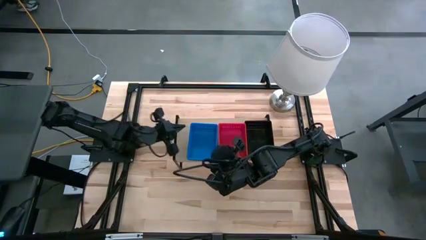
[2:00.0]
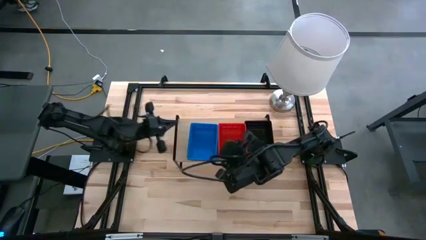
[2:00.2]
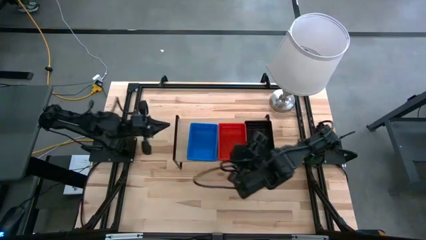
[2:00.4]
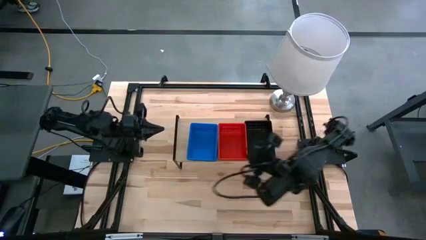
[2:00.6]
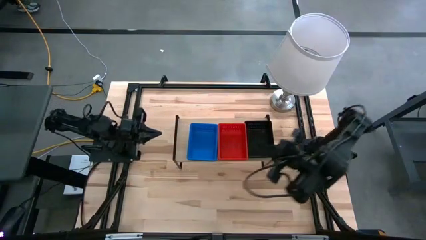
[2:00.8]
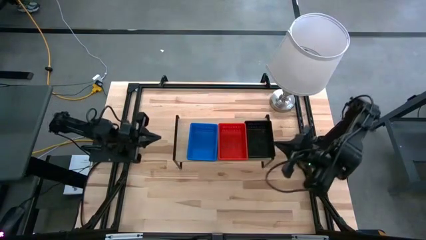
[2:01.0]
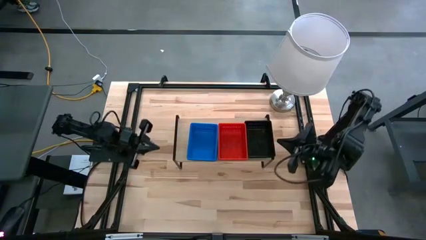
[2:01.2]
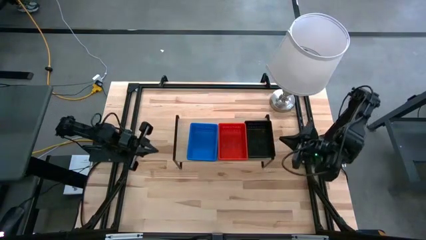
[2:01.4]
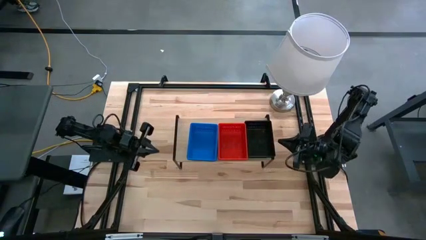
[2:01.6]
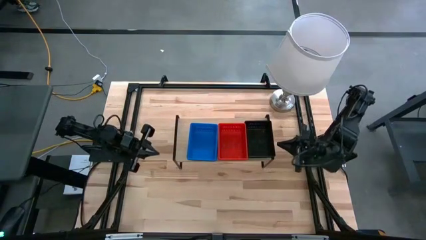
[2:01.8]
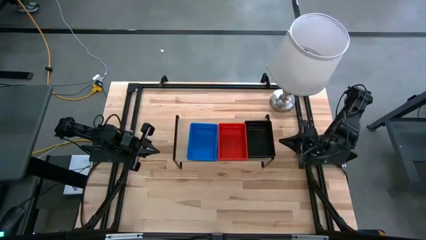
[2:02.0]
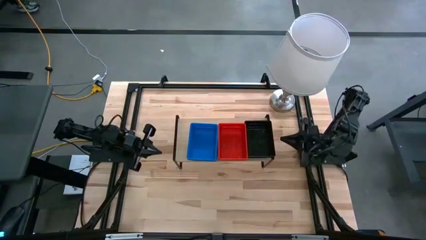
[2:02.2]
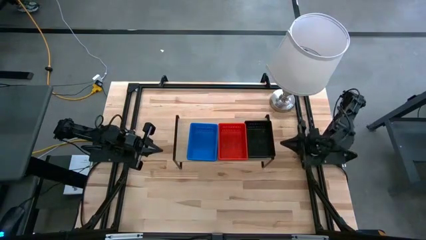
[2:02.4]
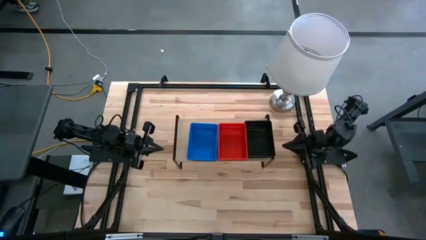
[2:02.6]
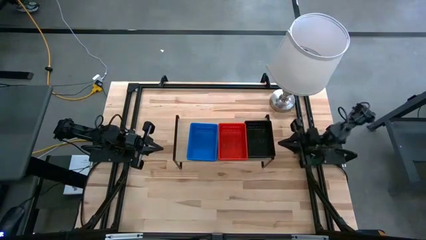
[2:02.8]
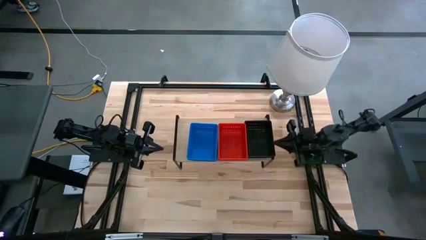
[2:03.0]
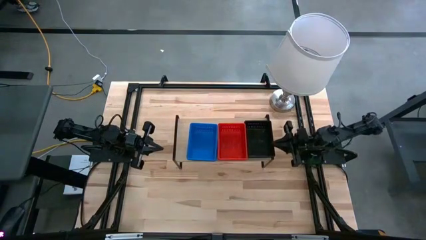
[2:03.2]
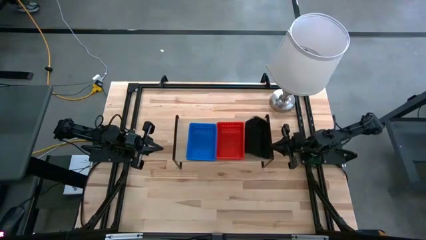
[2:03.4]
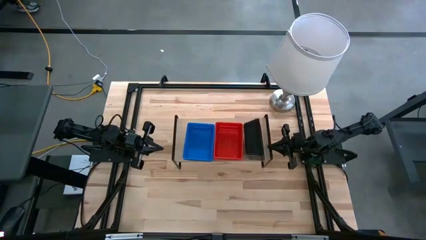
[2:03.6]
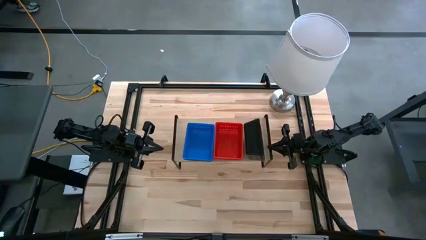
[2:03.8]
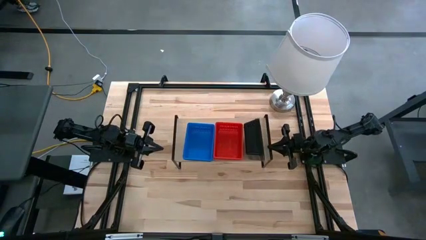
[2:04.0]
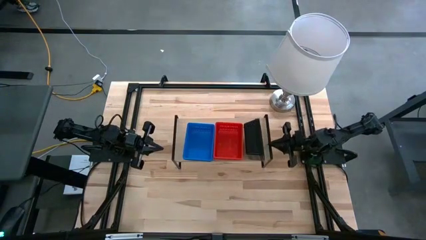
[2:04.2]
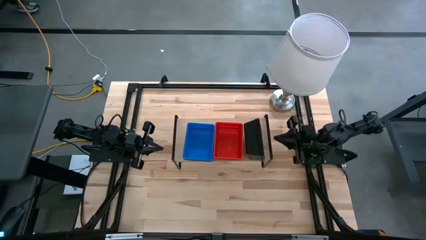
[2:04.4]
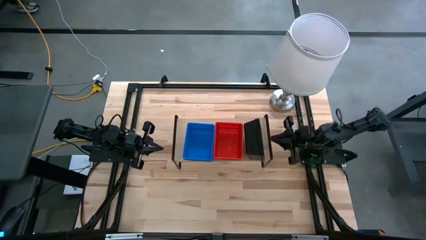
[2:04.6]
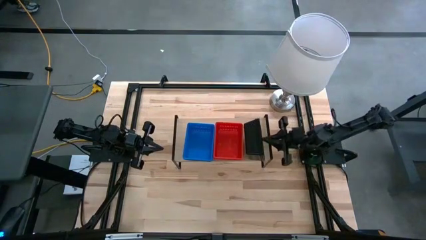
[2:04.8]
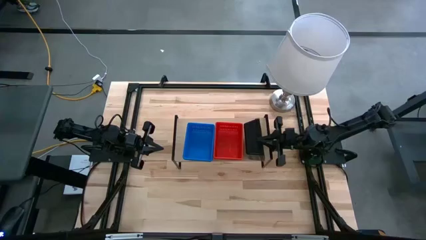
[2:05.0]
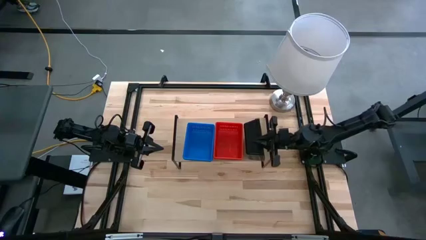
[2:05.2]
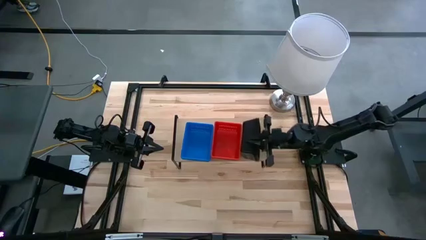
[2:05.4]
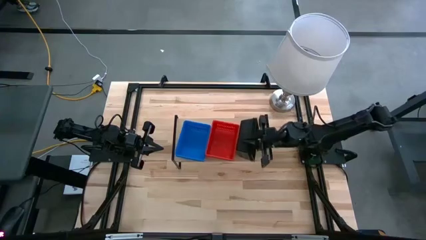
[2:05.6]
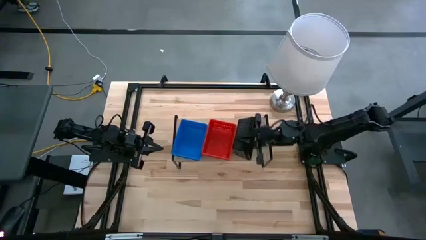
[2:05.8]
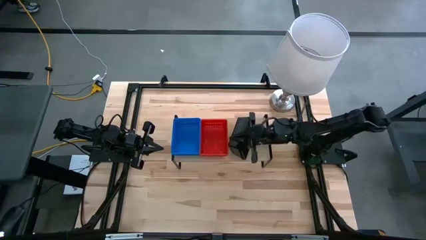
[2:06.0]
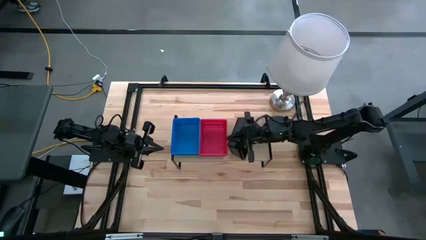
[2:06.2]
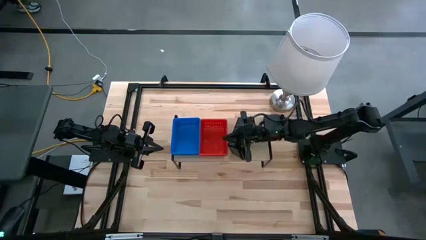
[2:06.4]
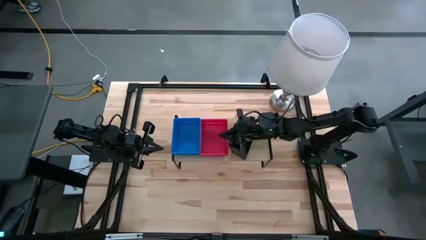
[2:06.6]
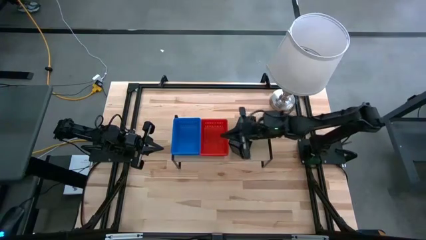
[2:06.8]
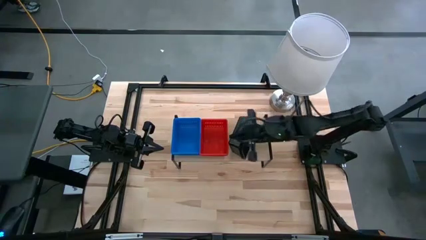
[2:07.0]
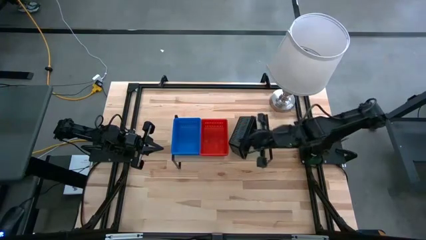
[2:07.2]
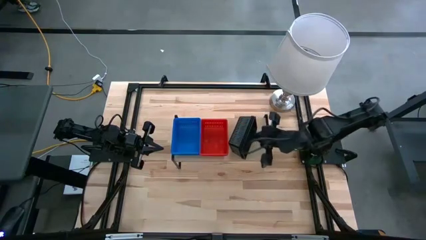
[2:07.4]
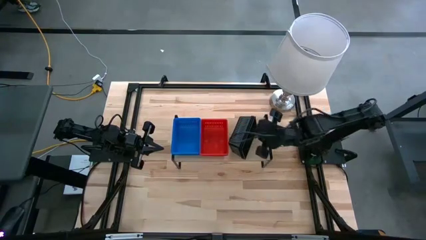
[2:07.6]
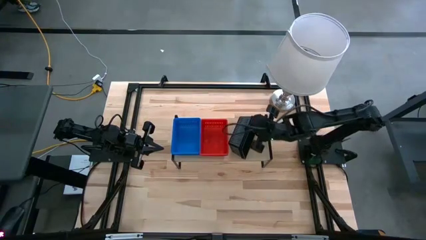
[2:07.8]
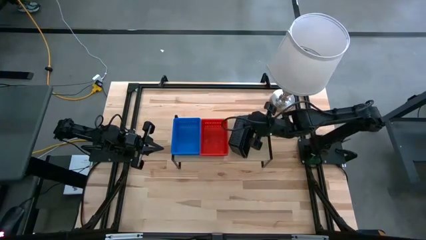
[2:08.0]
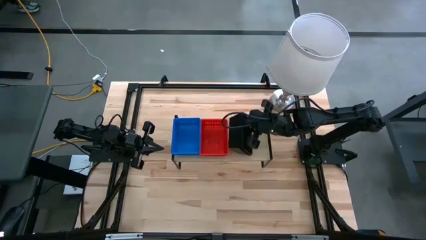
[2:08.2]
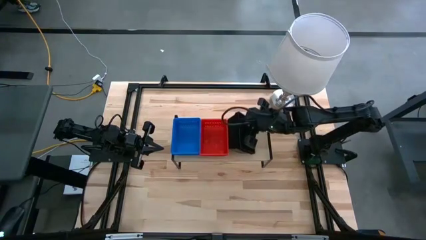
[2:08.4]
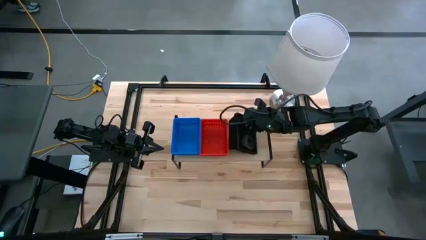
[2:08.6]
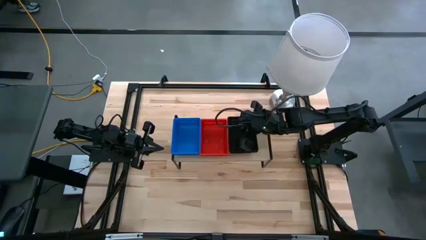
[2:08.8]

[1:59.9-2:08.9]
Task: Stack baskets on shelf by color
Adjust the stacked black bins on the shelf

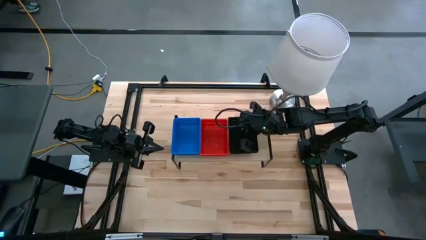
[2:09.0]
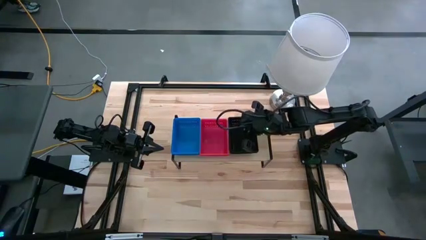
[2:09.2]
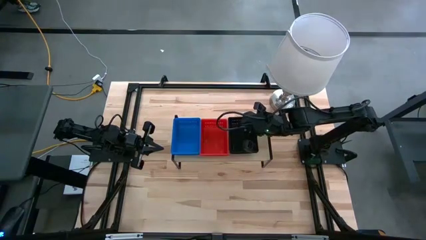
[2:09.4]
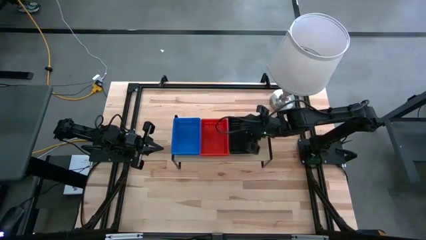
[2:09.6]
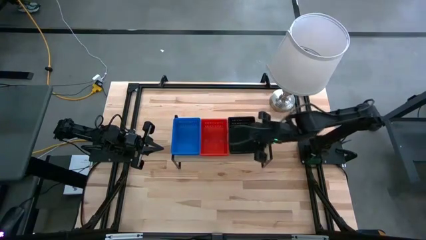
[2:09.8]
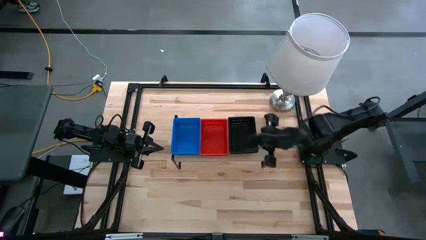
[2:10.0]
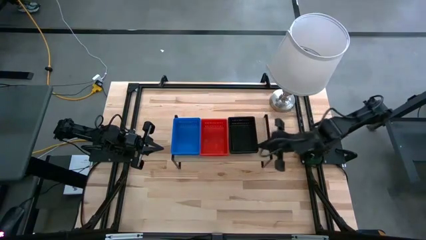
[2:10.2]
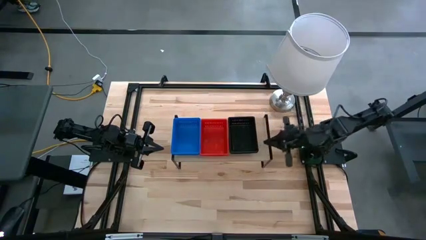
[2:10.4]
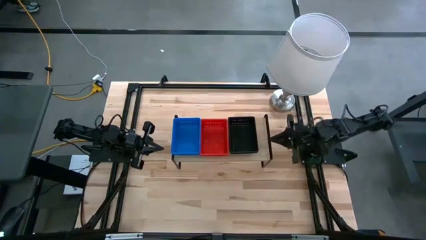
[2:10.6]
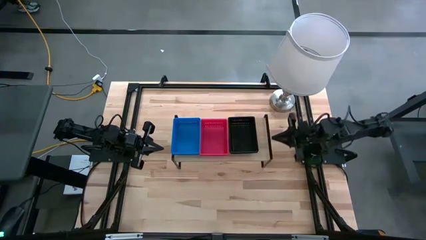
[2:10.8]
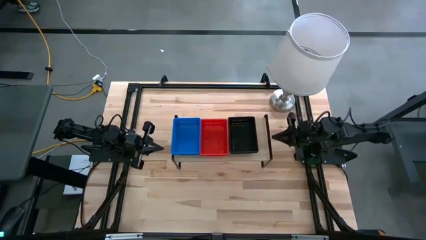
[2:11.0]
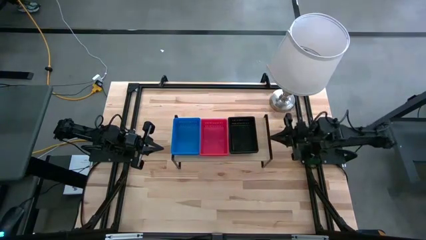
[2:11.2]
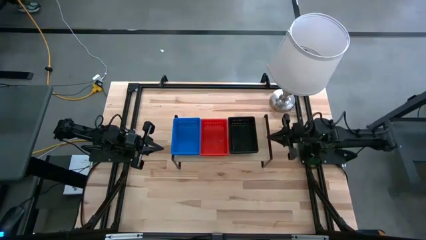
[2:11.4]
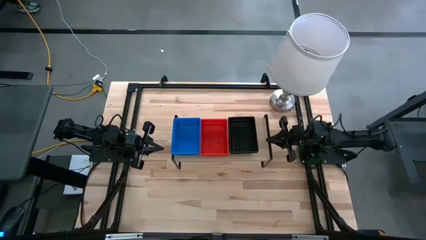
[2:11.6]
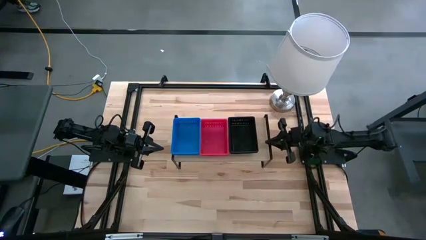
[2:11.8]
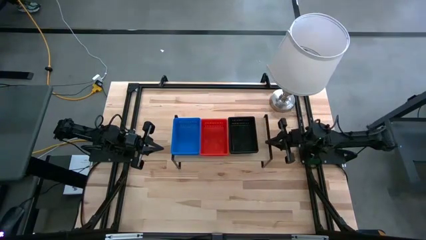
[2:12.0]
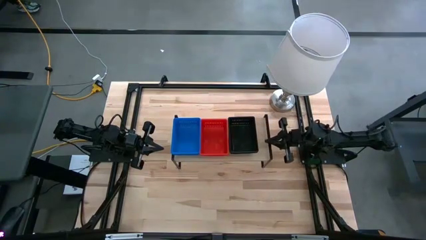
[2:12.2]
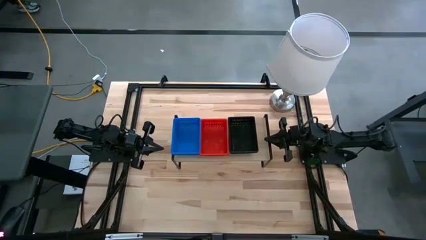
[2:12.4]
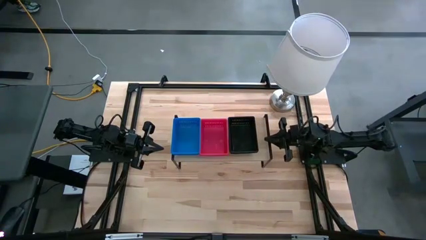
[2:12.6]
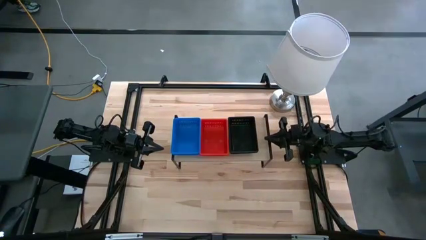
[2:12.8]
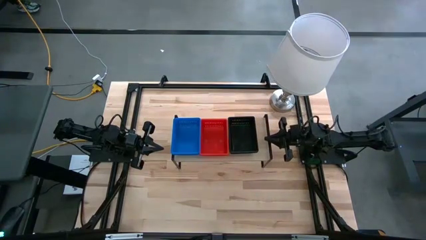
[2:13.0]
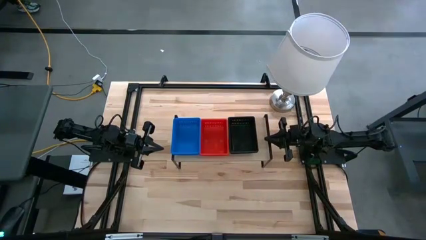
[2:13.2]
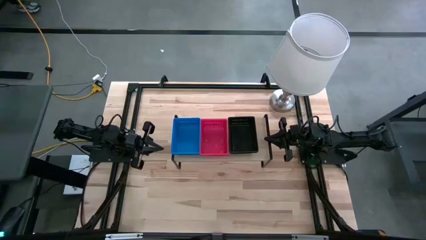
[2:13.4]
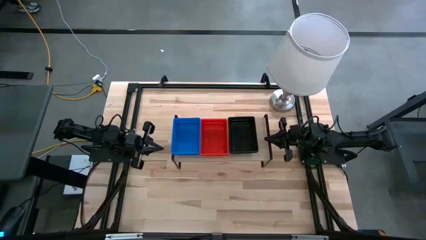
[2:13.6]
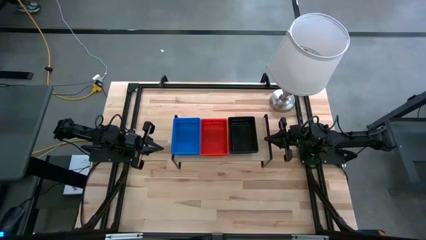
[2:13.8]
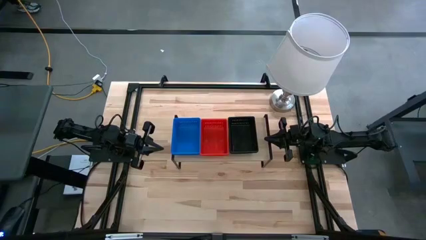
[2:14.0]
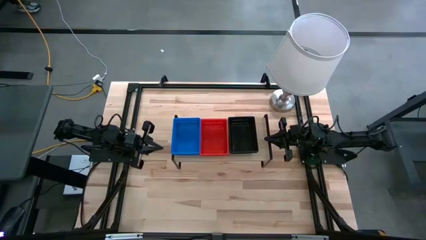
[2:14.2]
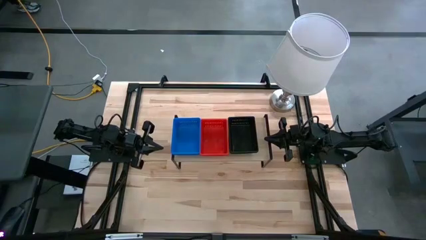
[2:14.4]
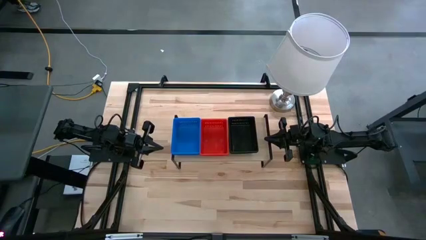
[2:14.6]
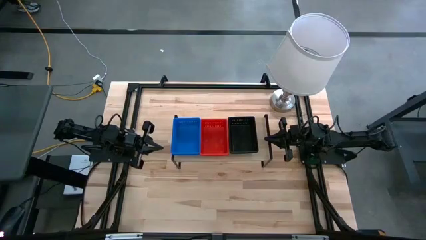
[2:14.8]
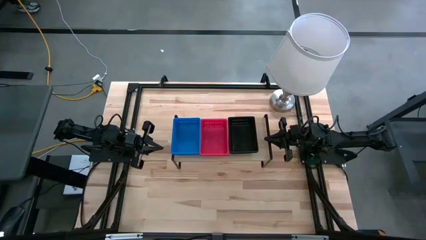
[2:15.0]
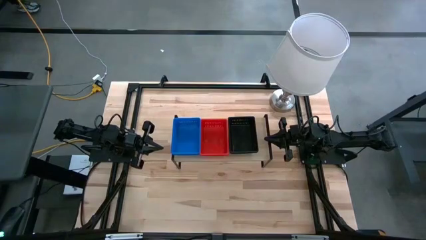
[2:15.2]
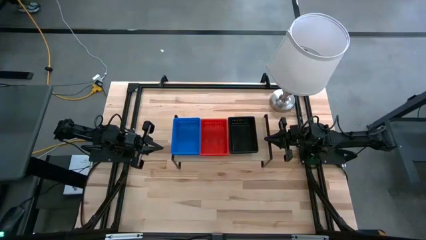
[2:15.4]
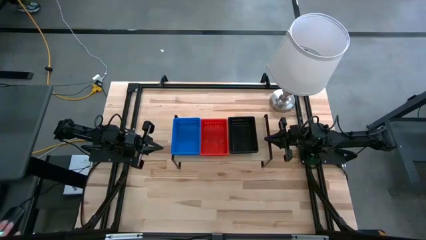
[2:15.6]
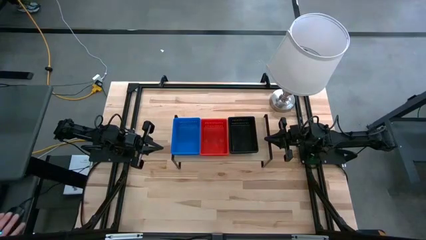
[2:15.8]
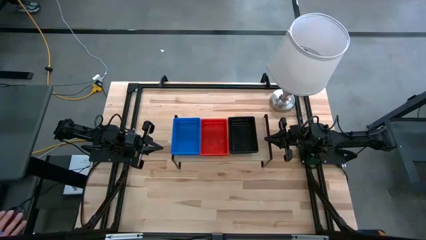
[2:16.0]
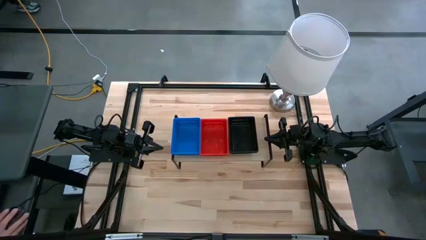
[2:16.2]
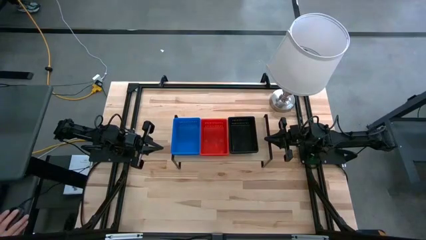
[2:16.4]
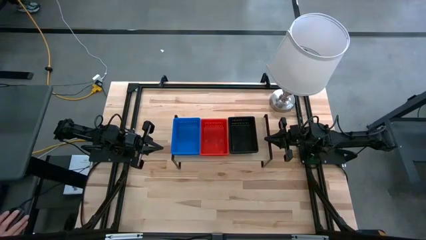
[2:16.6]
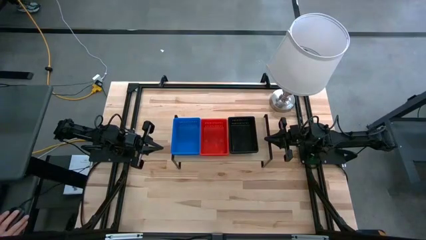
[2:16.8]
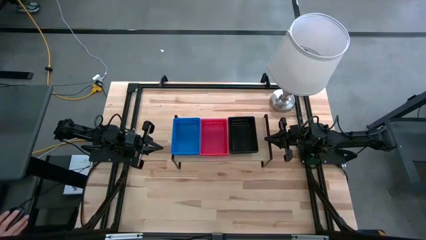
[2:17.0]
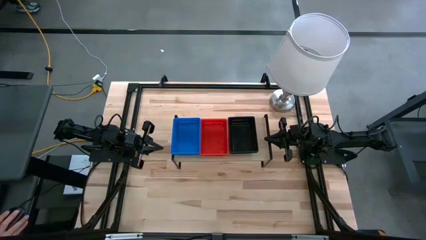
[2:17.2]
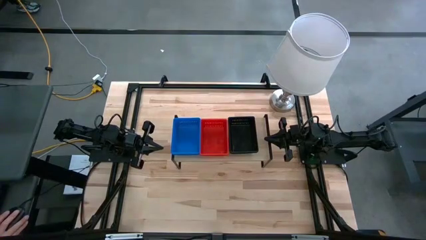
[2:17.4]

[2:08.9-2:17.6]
Return to Home Position
